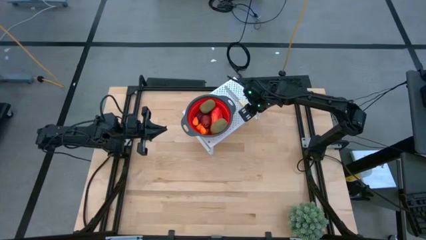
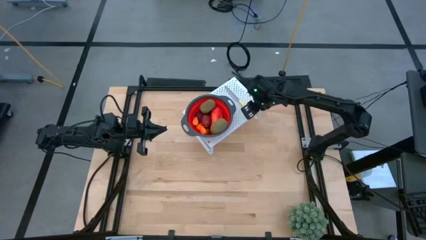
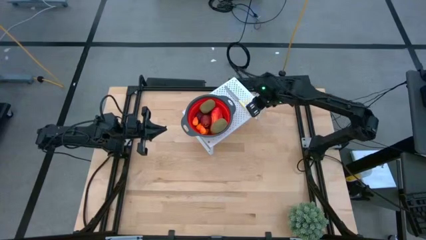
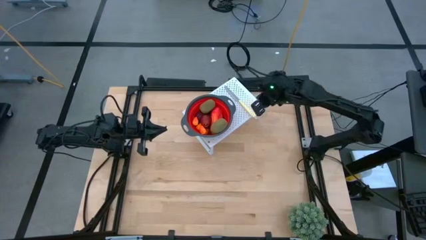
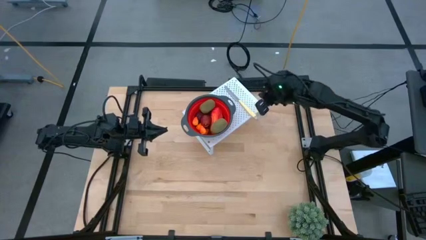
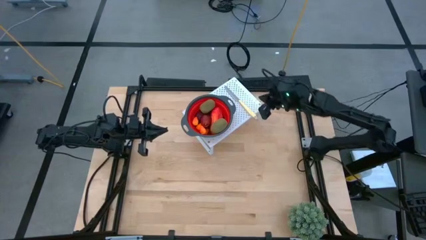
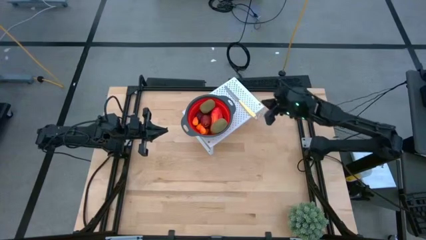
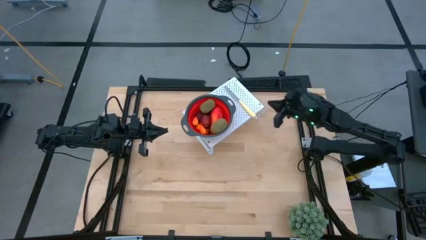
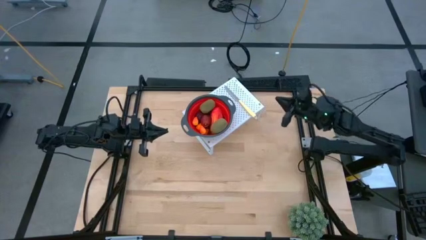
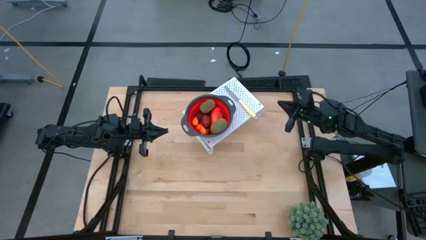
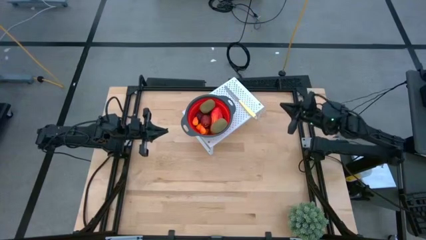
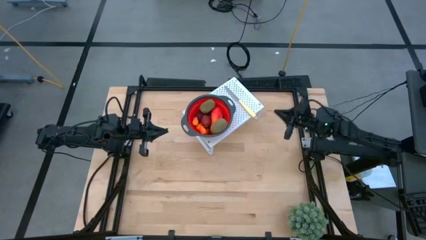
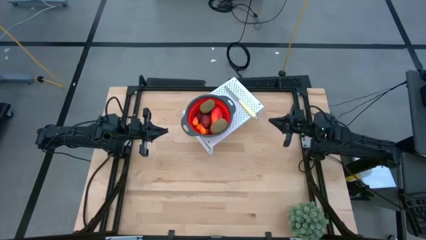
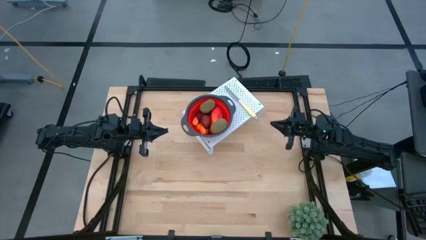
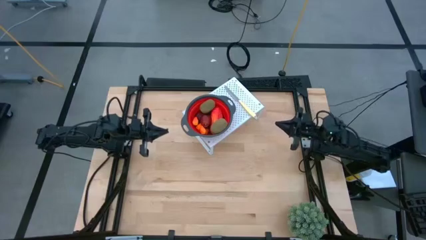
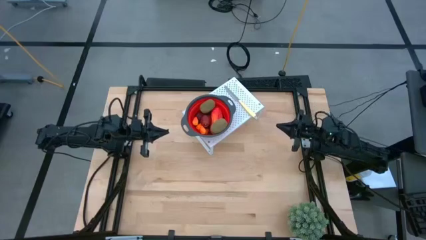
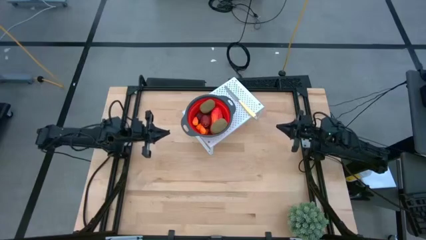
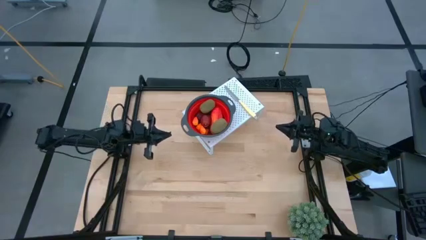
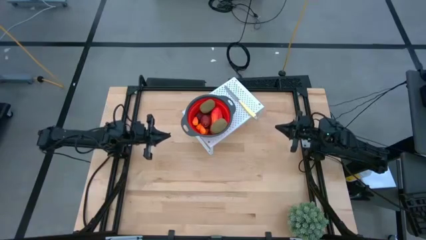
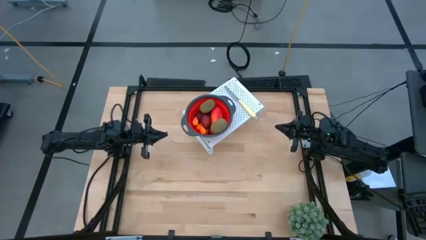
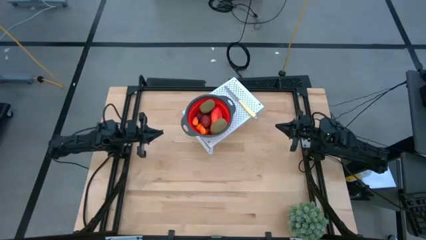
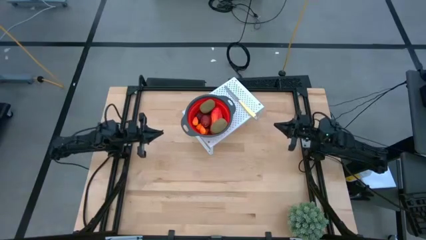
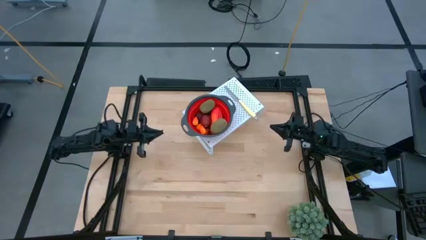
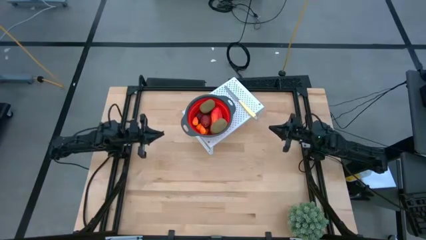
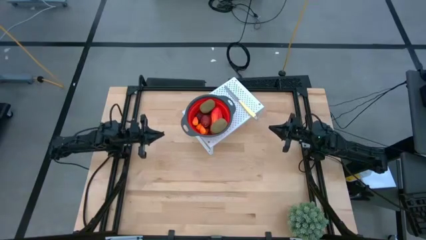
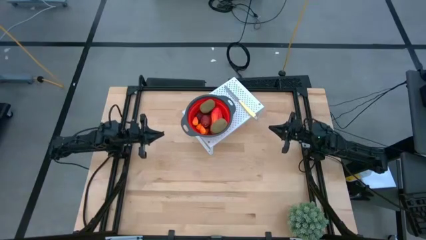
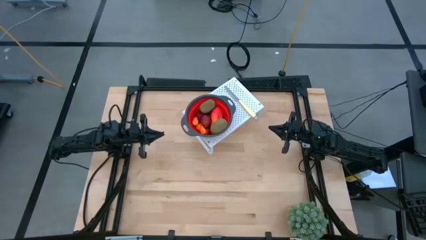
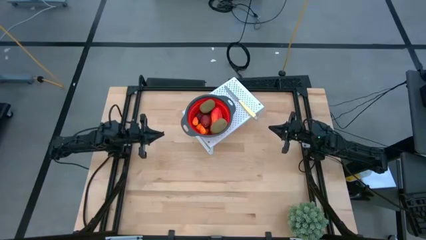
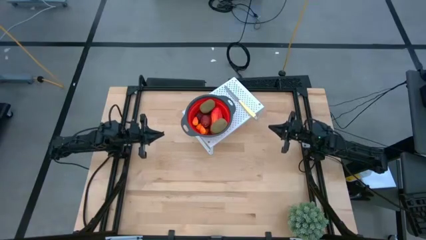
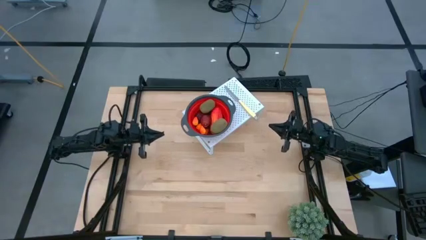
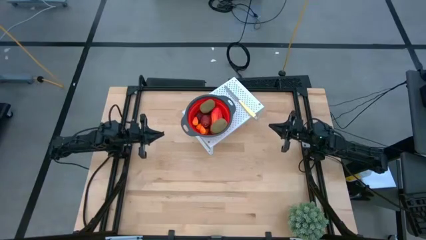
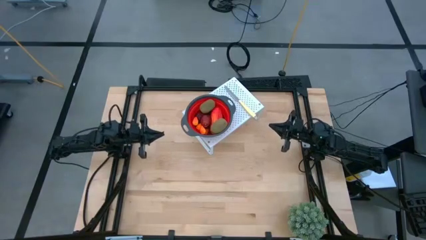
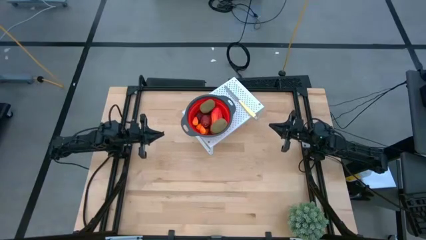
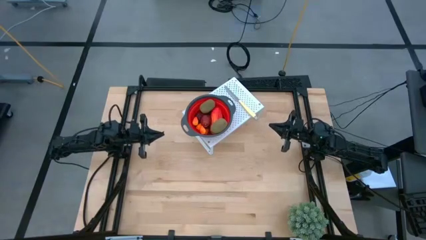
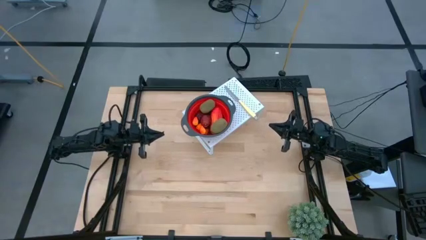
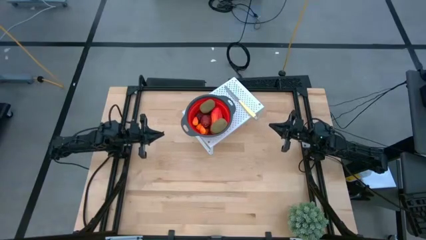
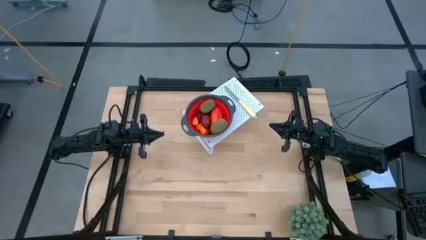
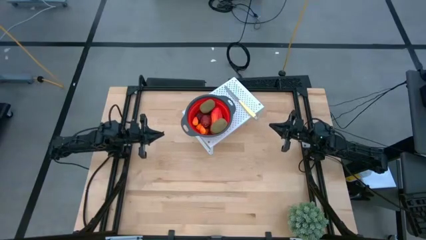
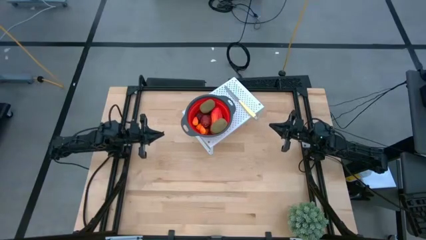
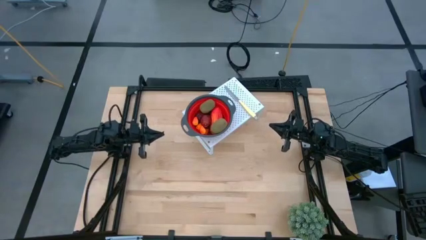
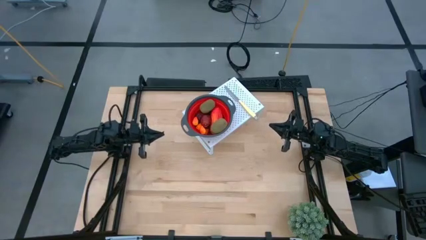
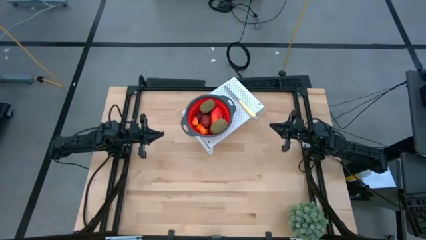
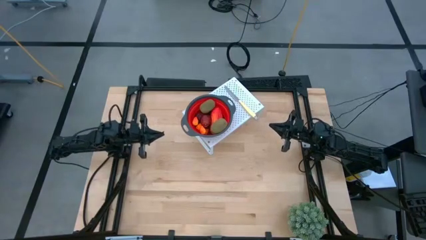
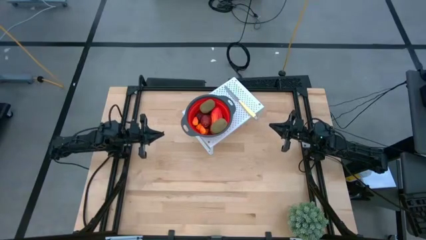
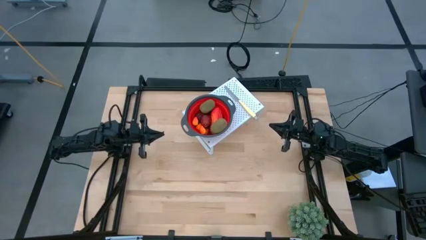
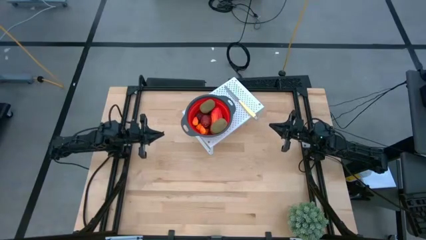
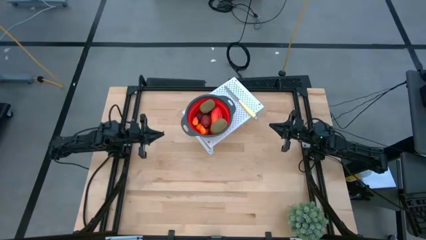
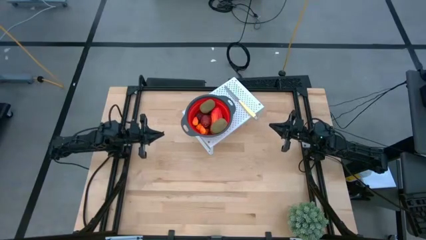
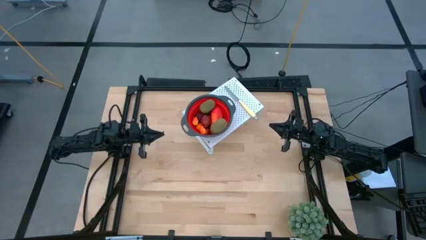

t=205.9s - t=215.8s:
Task: Pick & Place Fruit
Return to Home Position

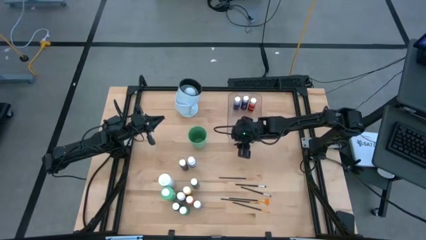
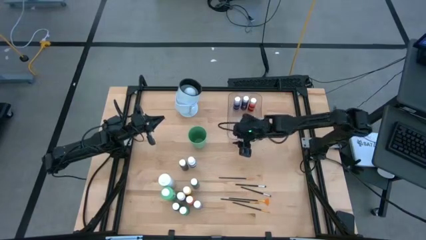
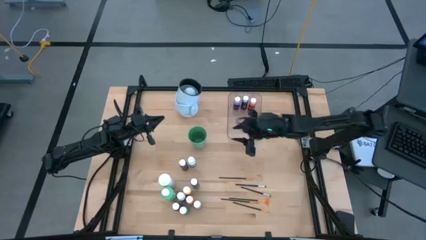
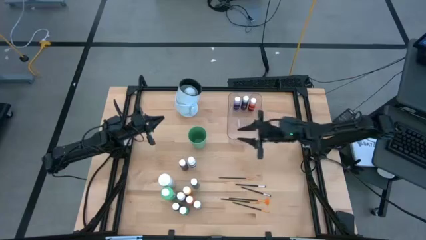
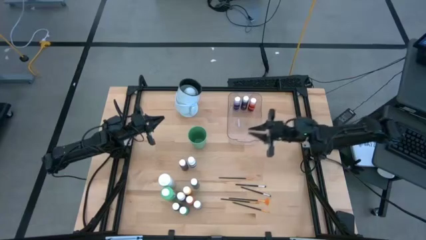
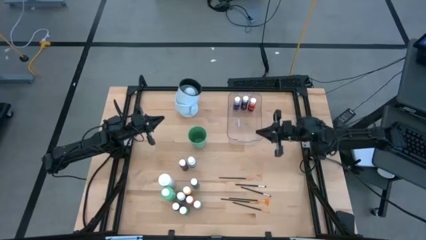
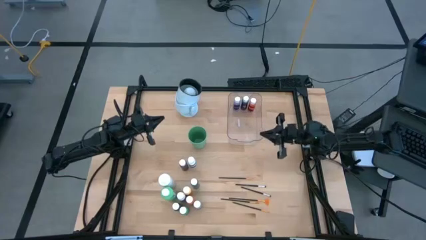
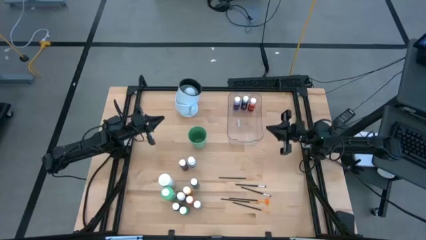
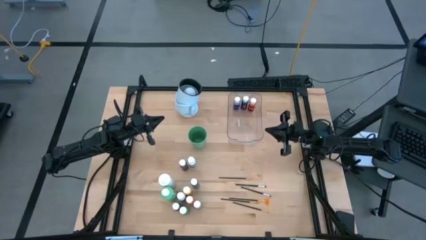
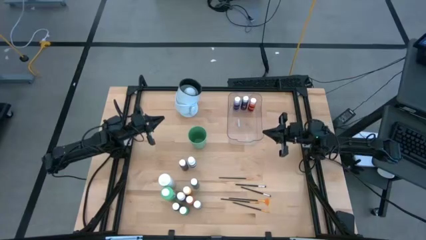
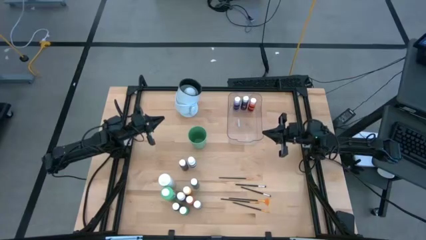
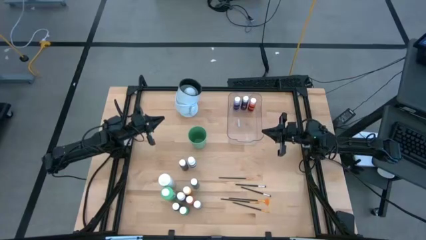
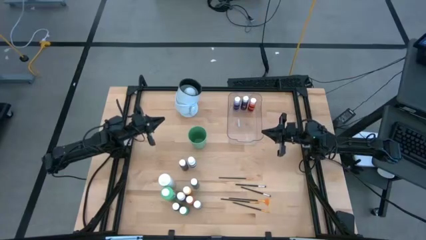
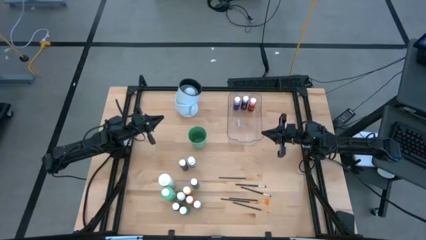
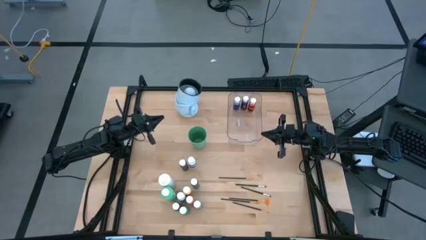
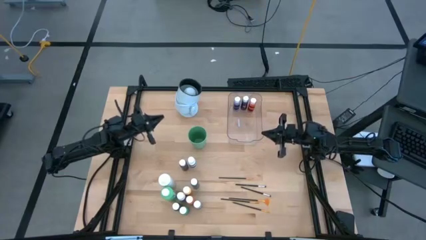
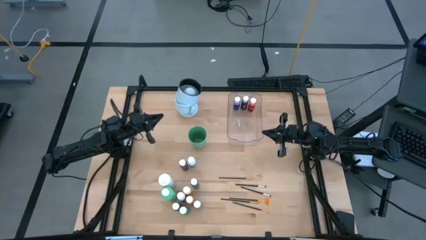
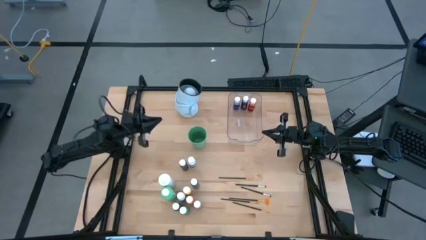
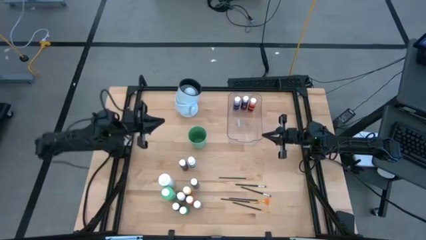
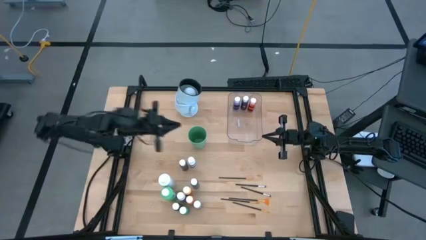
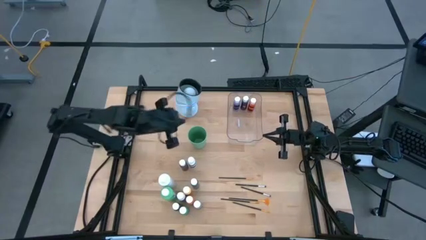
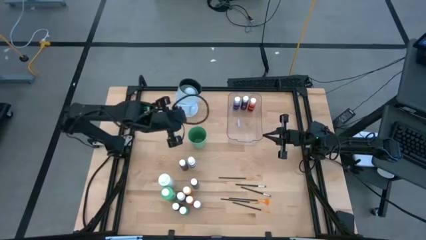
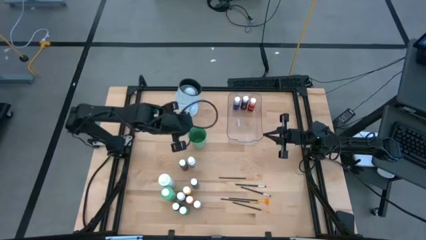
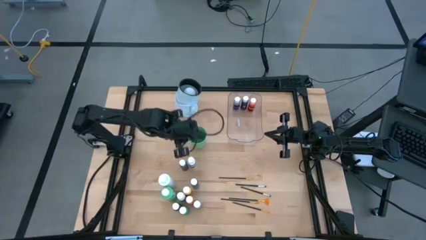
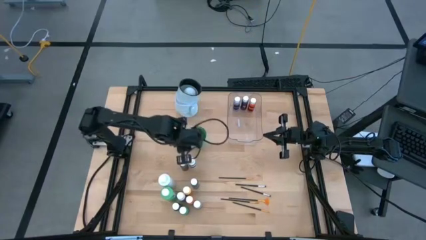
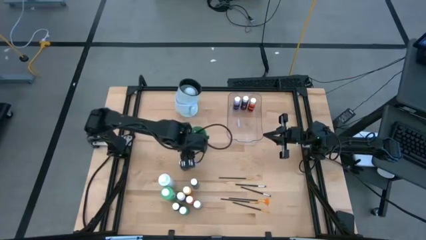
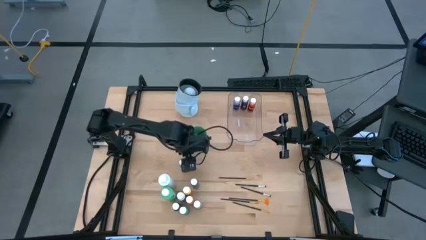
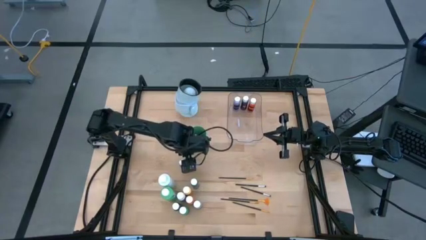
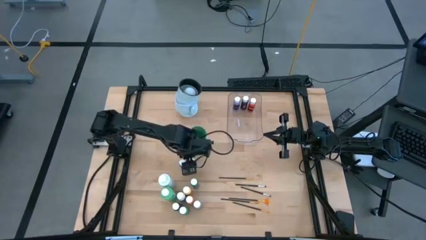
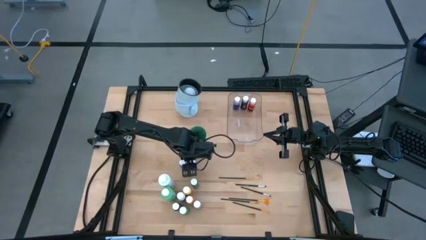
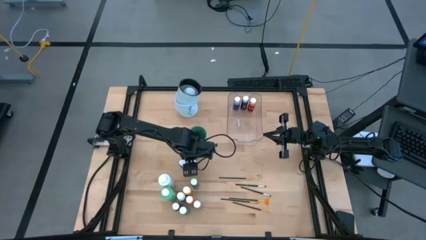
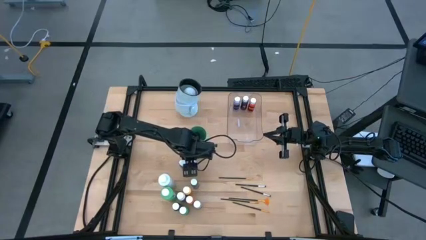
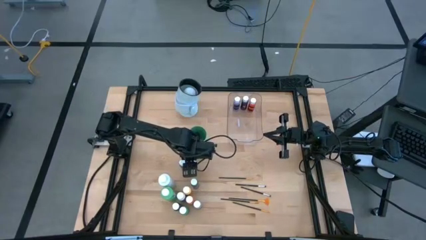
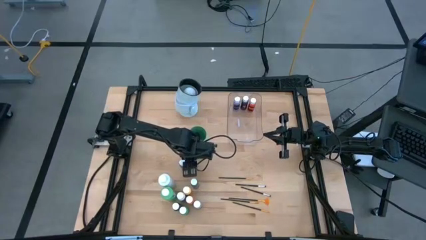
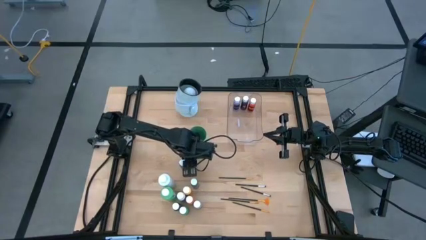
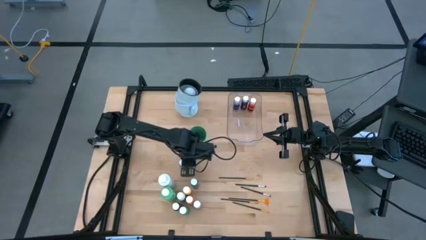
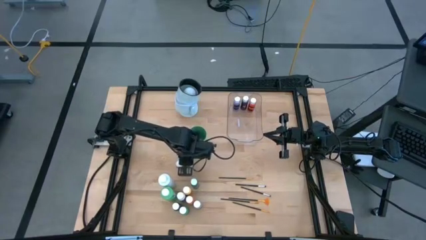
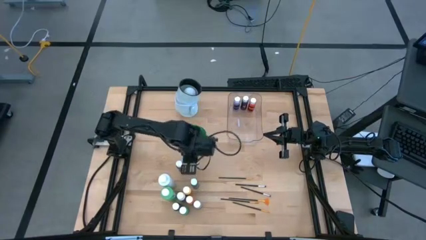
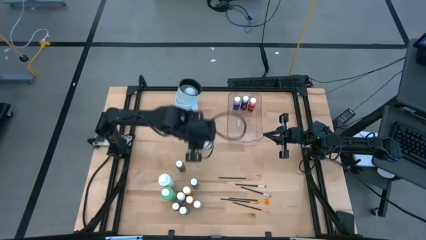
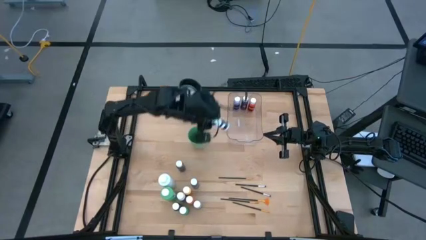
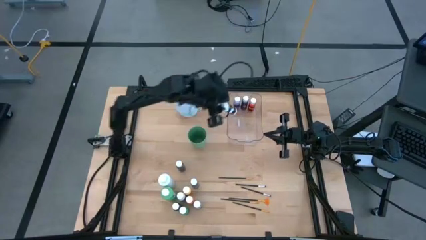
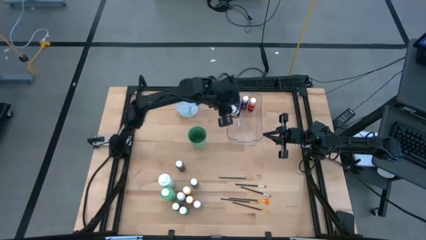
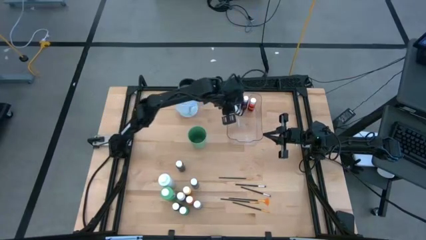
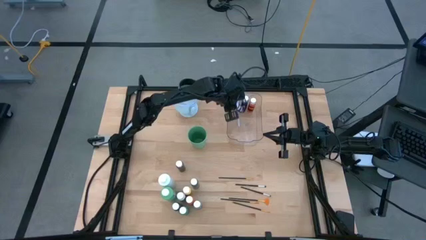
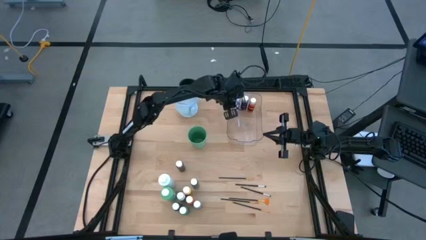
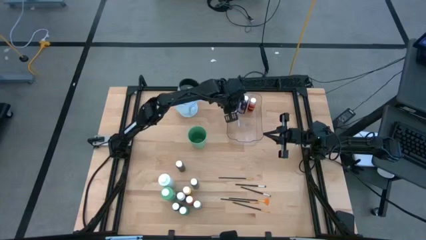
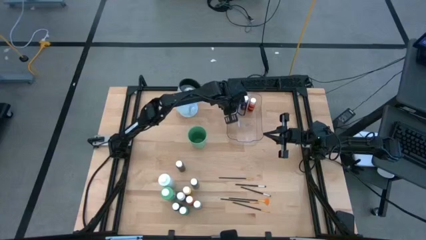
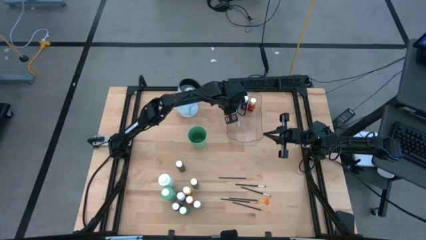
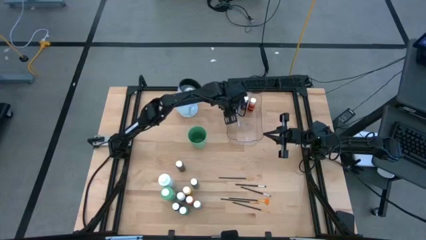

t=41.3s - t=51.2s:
Task: Pick & Place Paint Supplies
Put the top white paint bottle into the transparent bin
